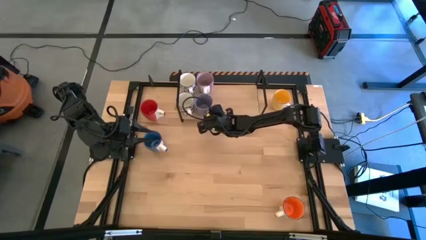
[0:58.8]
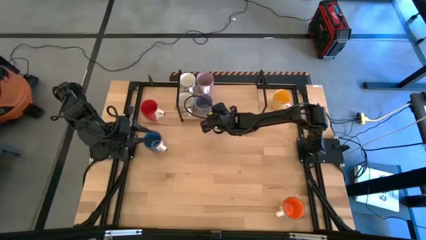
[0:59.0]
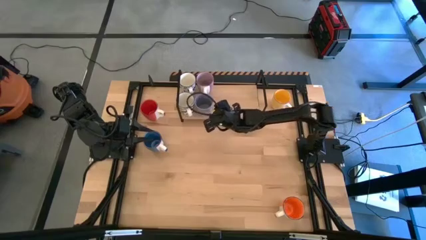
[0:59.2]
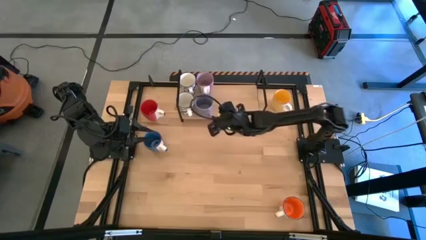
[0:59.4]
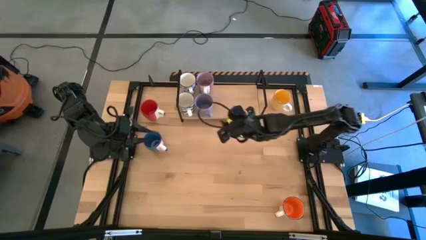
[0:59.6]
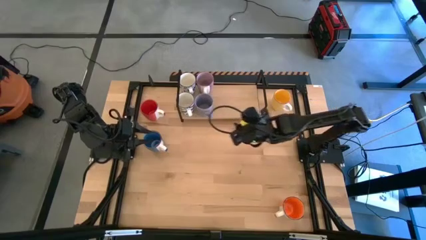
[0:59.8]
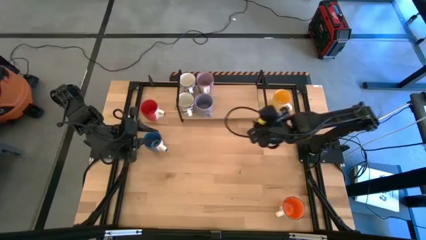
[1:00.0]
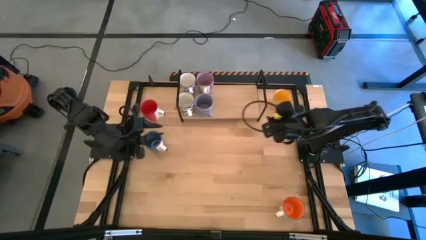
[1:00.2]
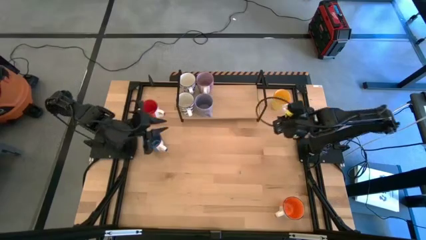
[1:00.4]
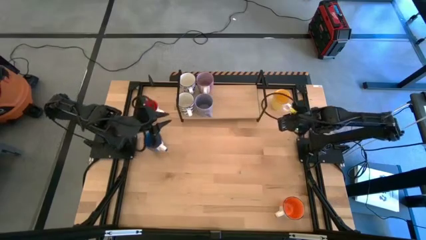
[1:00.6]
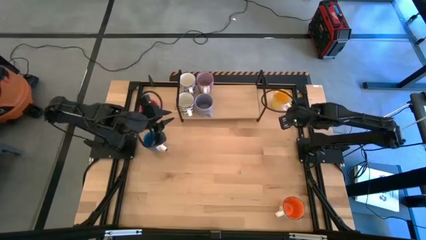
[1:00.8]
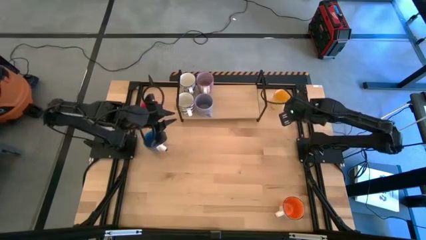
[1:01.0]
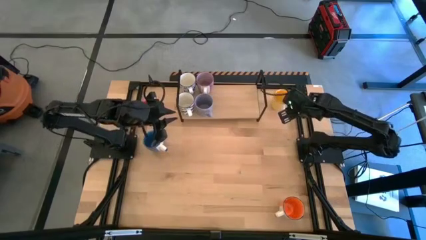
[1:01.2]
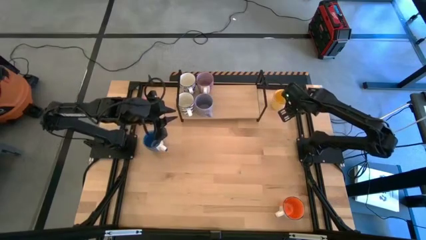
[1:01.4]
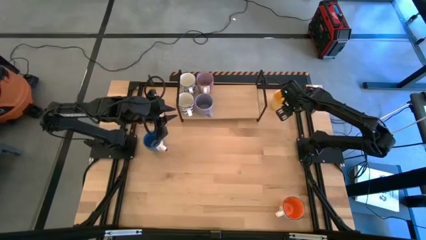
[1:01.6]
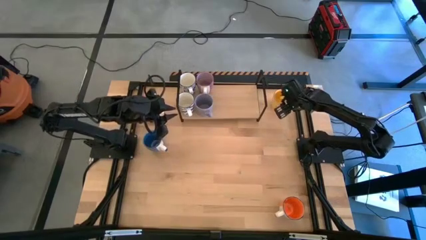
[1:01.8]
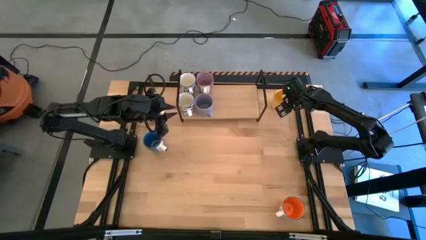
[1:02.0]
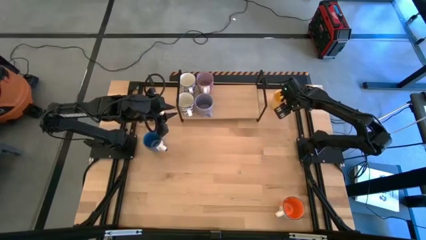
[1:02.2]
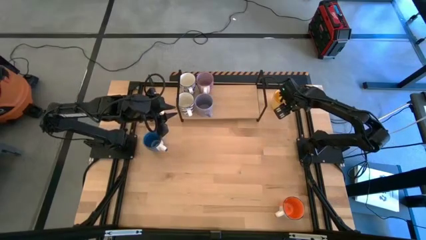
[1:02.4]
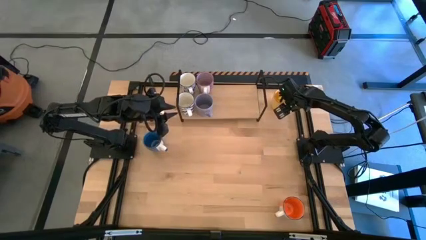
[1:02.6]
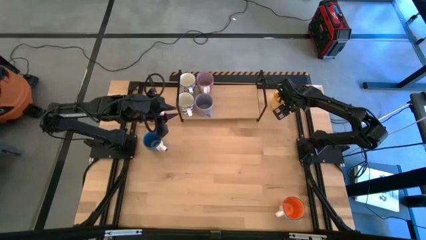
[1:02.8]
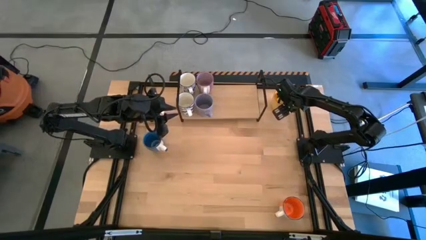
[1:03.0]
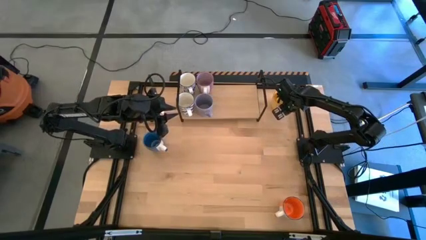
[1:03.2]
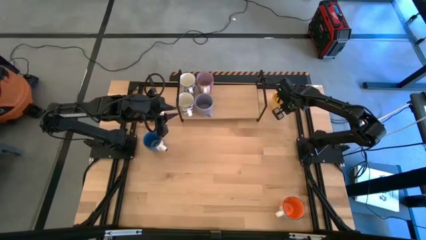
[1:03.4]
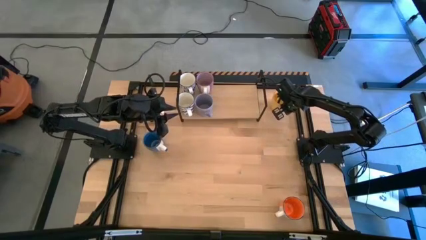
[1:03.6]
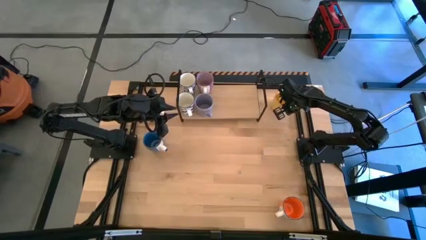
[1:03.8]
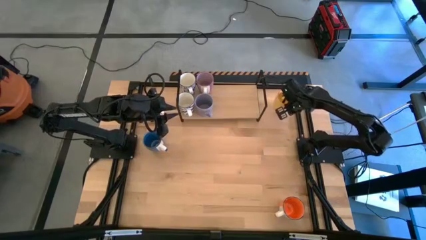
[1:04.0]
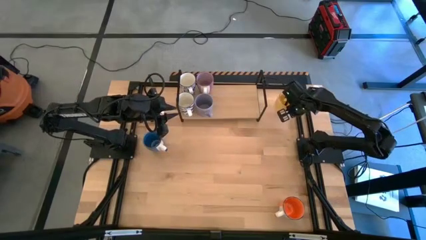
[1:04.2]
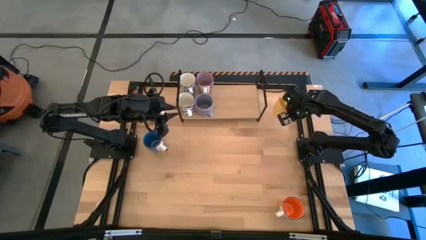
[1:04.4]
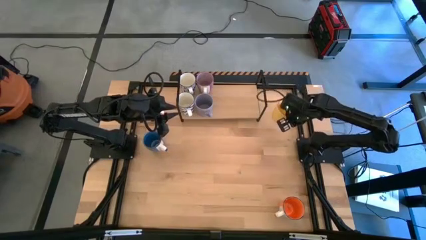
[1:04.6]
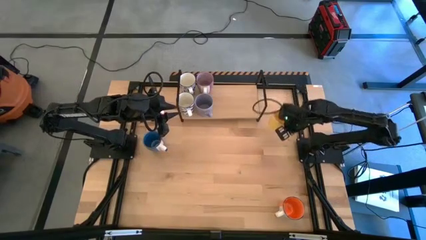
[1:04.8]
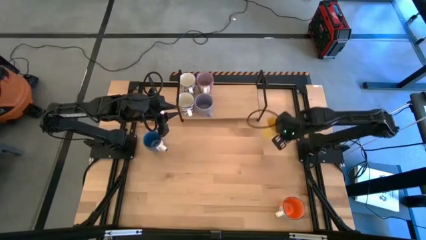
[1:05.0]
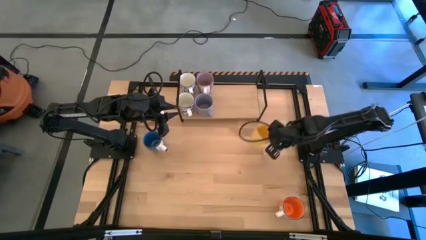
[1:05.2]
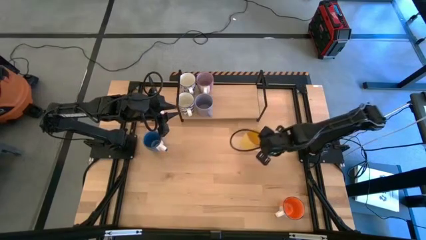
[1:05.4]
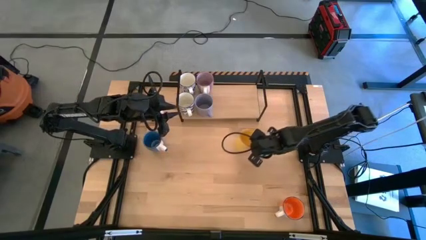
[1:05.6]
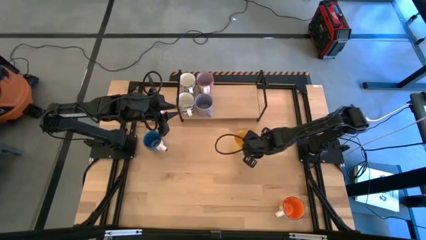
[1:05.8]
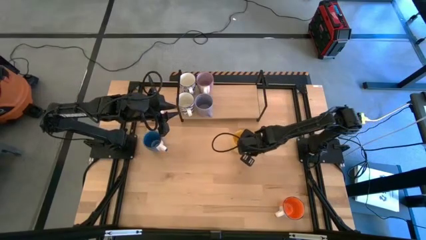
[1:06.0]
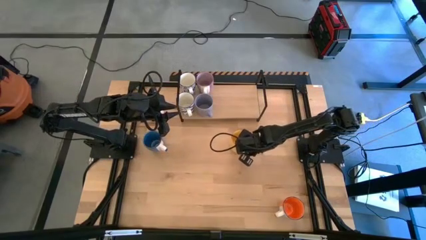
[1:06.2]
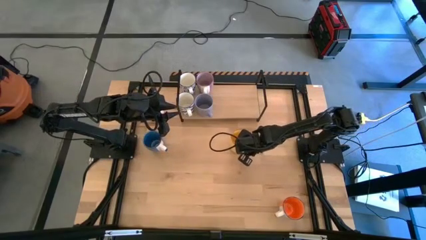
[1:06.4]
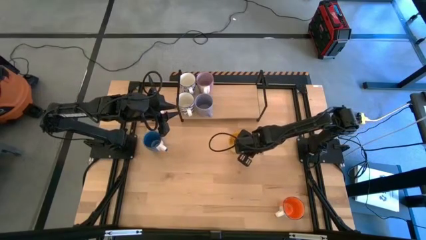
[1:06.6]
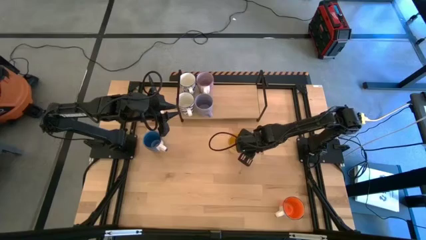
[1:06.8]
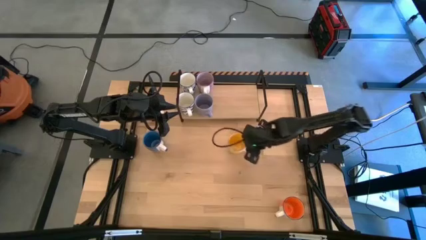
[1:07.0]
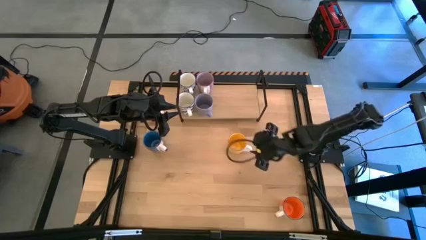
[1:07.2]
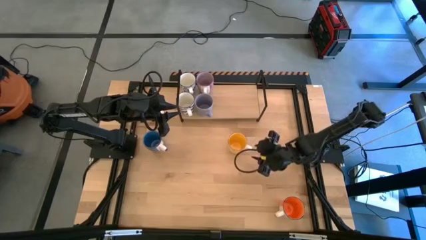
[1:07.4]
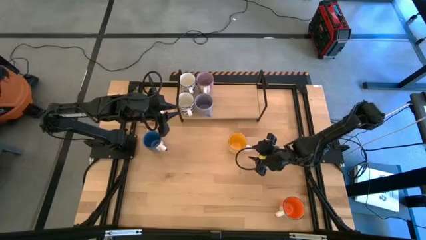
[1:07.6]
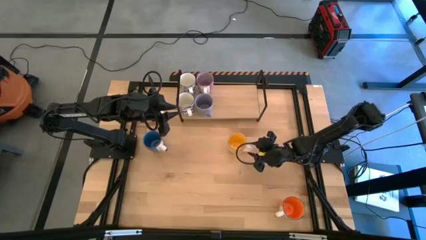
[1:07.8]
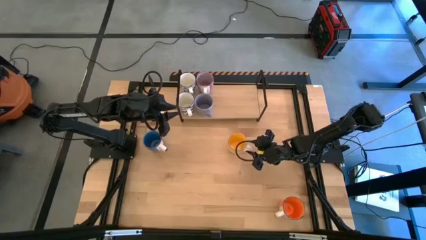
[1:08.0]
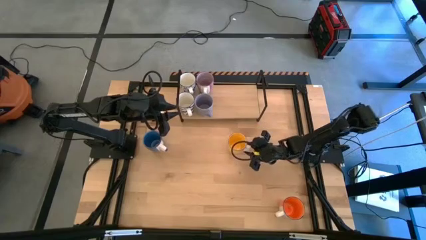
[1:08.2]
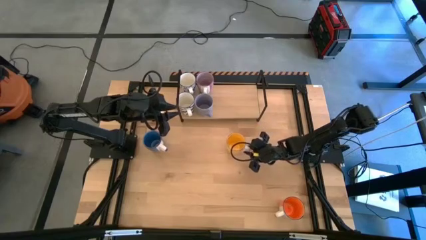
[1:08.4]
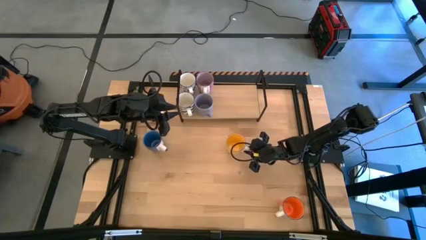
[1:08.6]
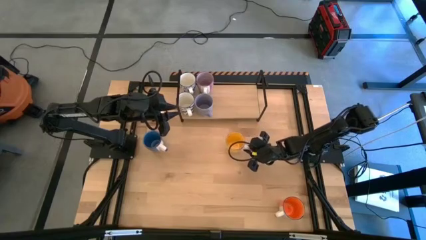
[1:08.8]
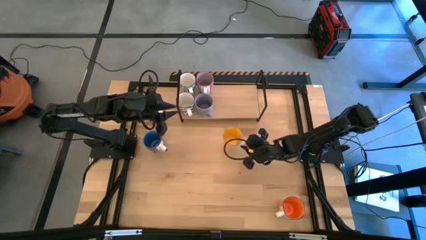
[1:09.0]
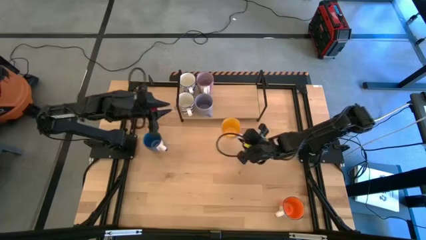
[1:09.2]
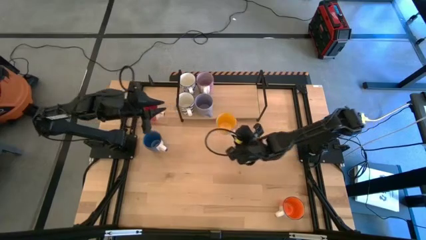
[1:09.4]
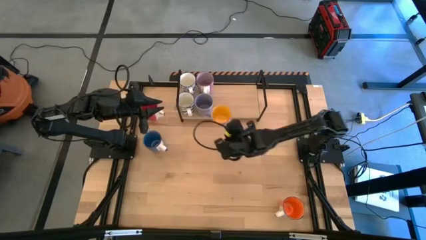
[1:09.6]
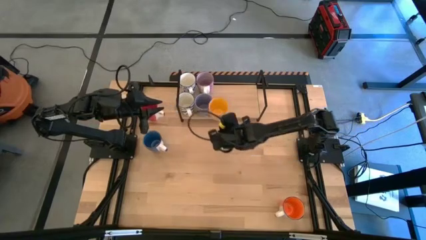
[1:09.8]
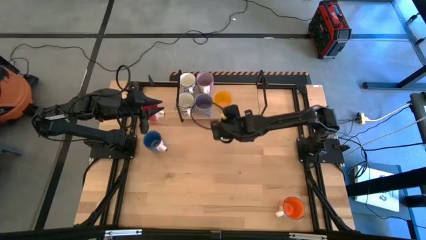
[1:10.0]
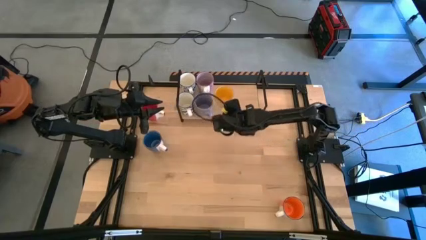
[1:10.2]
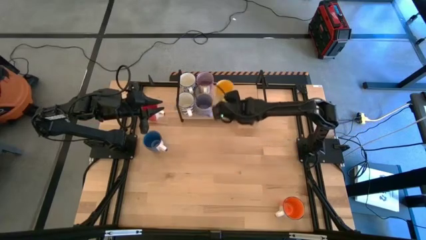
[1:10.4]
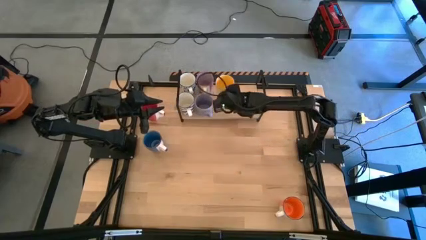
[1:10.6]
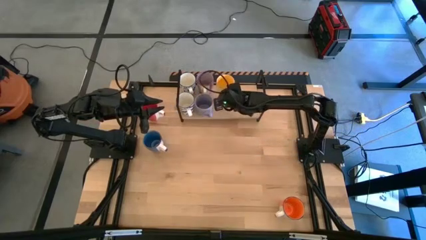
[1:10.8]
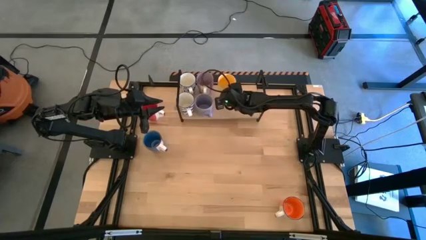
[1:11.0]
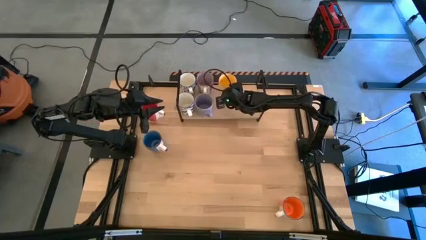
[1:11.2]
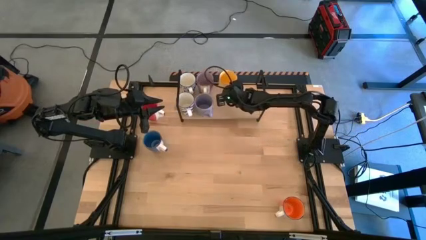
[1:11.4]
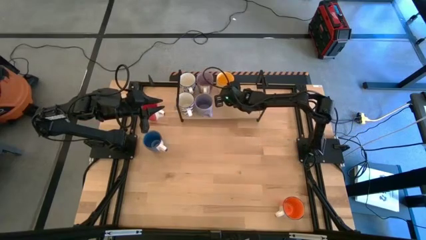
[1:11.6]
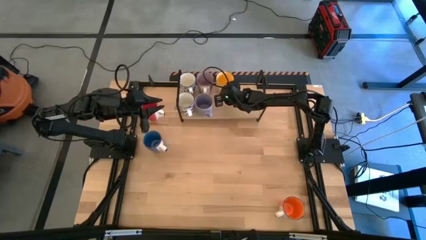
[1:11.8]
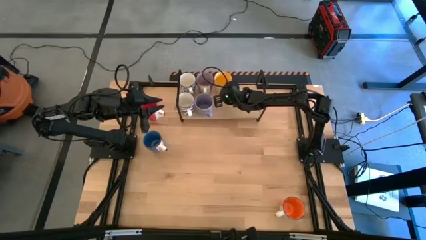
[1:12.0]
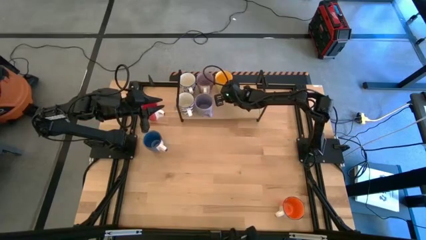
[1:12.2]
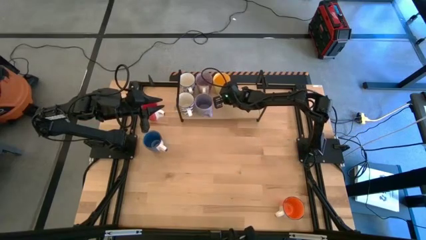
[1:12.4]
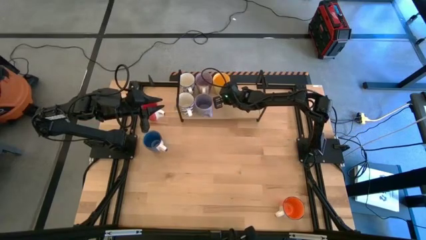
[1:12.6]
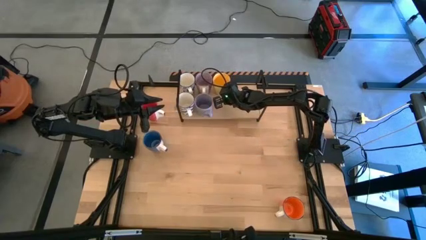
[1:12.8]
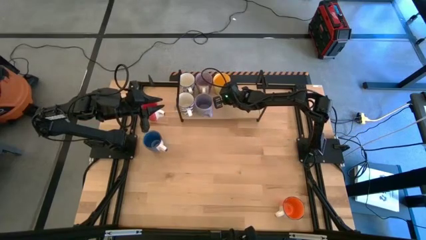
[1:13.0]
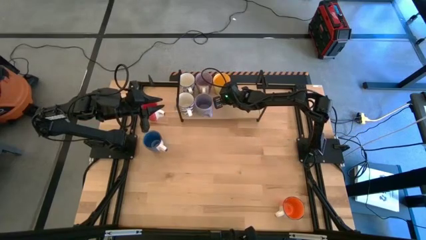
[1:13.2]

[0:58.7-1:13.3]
Task: Place coffee mugs
Put the yellow mug on the shelf
